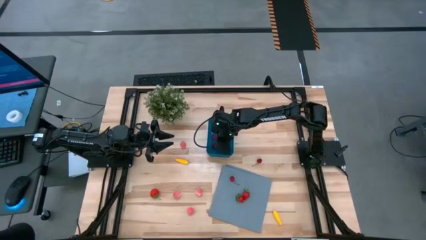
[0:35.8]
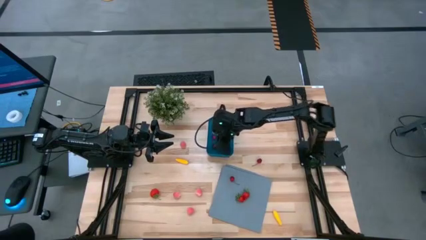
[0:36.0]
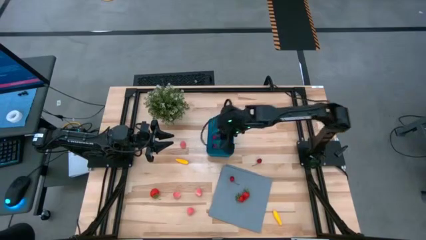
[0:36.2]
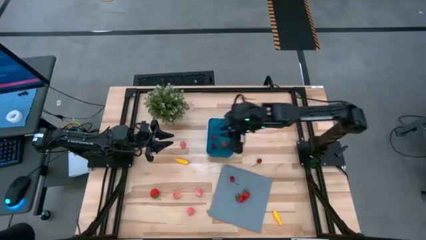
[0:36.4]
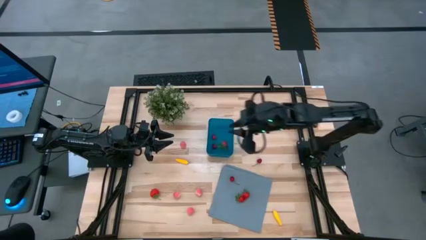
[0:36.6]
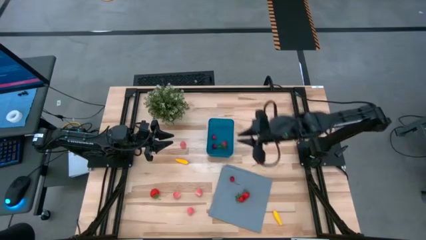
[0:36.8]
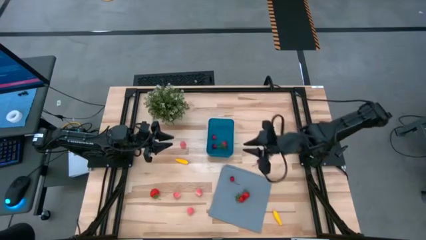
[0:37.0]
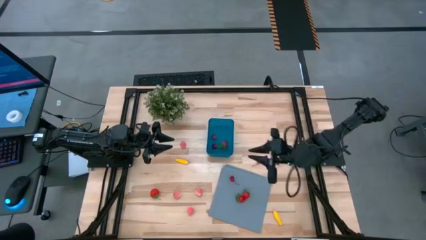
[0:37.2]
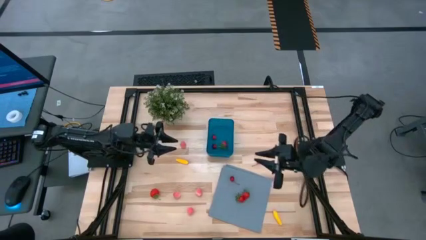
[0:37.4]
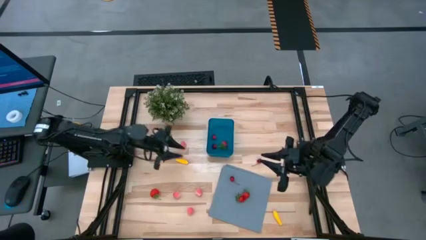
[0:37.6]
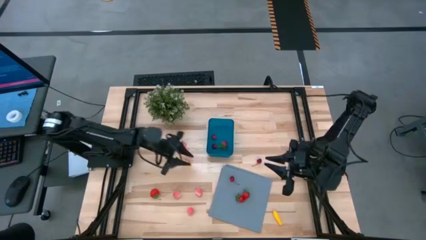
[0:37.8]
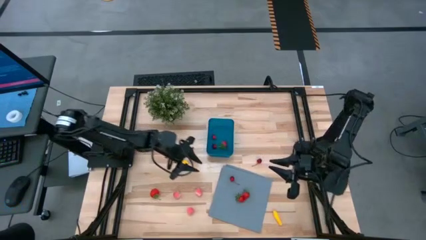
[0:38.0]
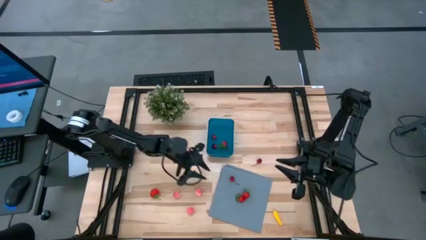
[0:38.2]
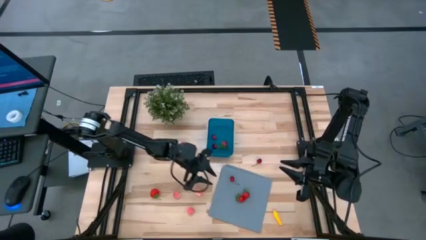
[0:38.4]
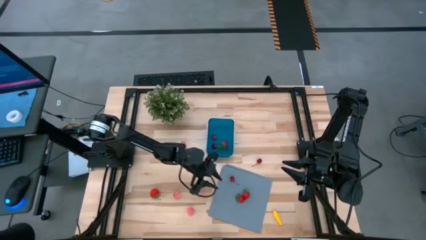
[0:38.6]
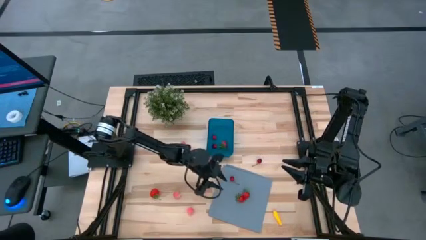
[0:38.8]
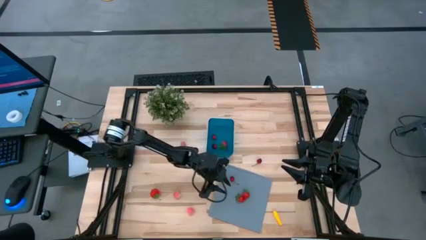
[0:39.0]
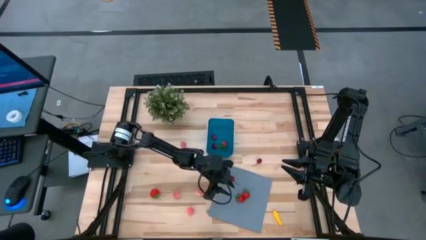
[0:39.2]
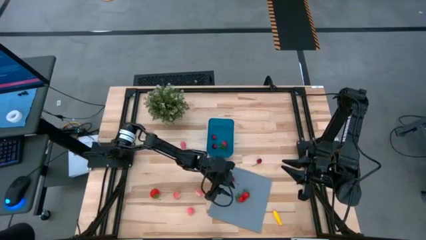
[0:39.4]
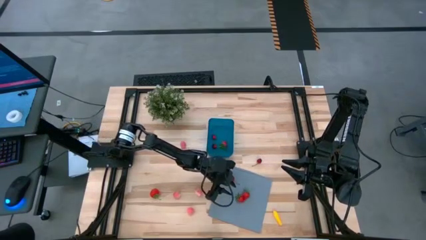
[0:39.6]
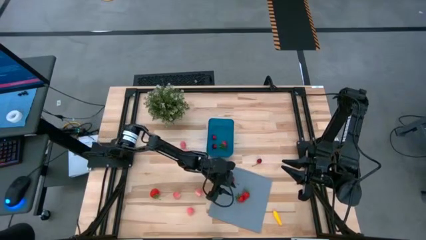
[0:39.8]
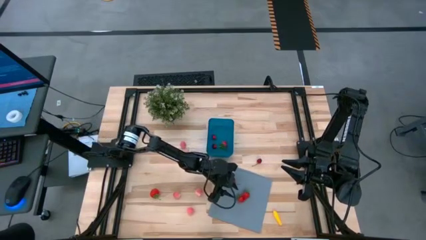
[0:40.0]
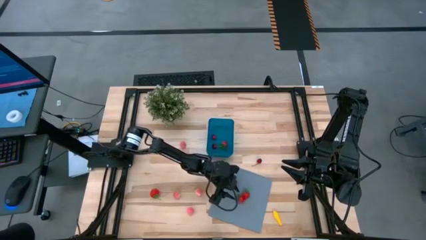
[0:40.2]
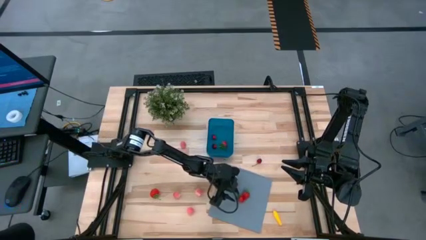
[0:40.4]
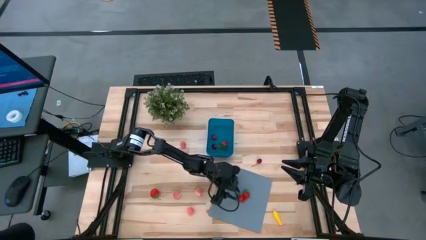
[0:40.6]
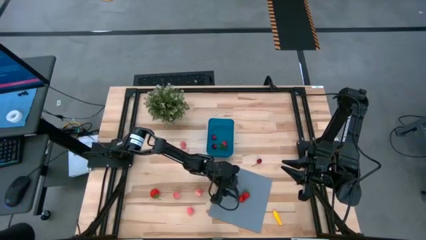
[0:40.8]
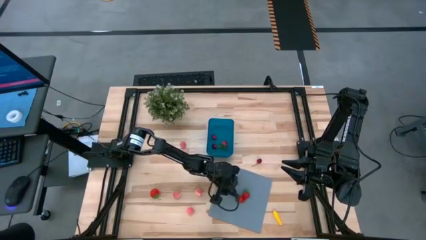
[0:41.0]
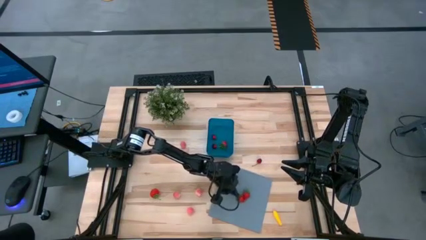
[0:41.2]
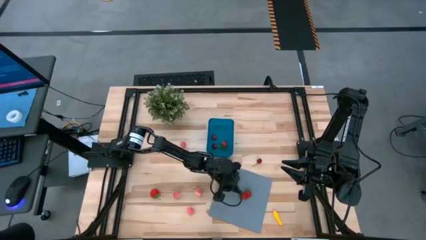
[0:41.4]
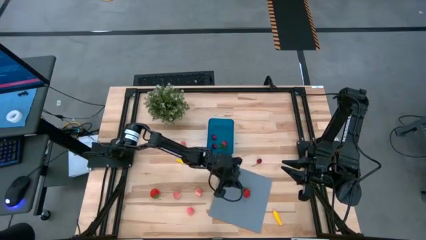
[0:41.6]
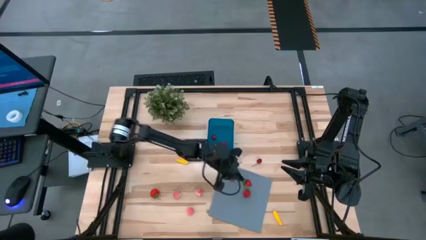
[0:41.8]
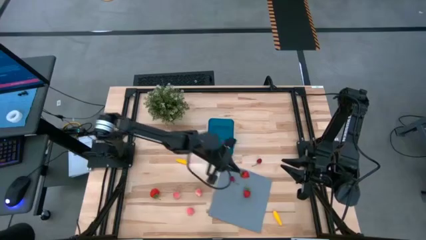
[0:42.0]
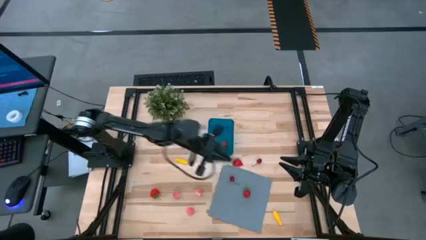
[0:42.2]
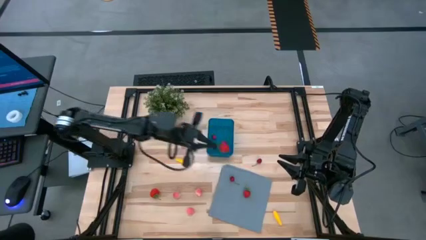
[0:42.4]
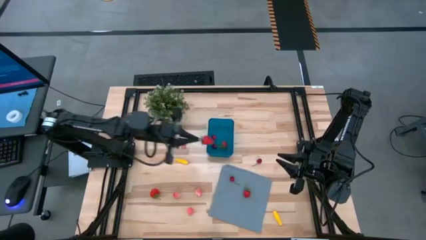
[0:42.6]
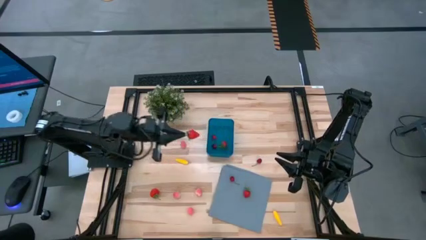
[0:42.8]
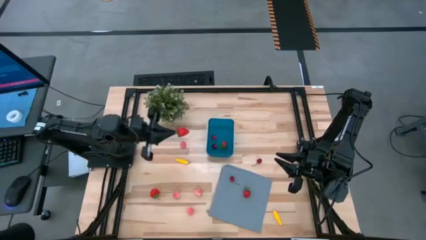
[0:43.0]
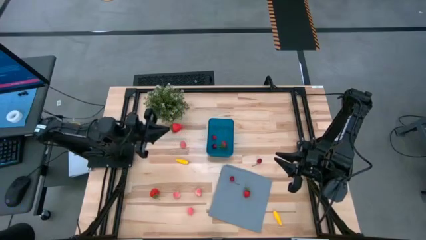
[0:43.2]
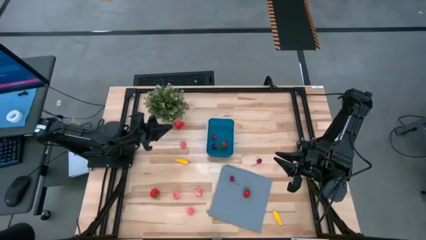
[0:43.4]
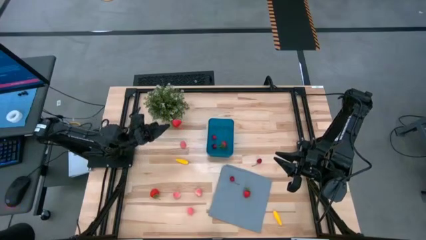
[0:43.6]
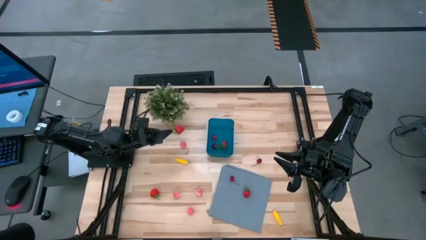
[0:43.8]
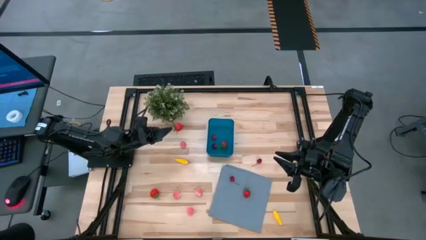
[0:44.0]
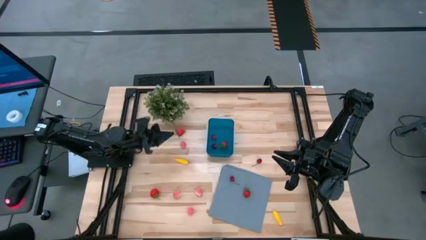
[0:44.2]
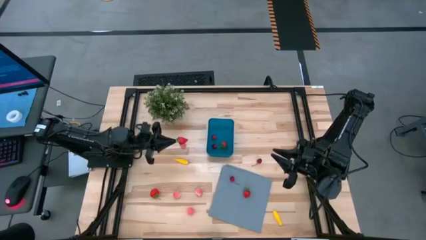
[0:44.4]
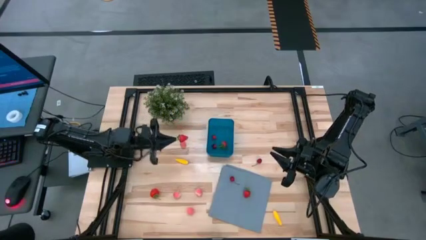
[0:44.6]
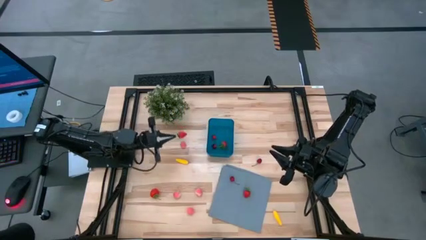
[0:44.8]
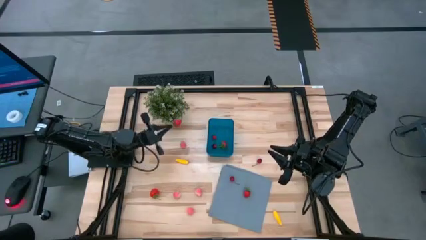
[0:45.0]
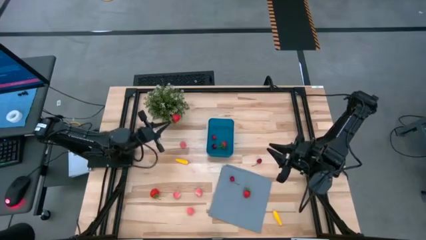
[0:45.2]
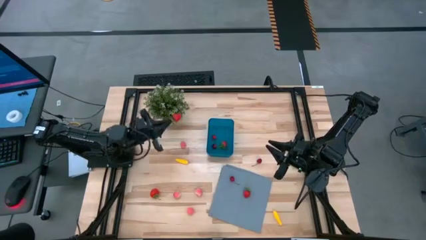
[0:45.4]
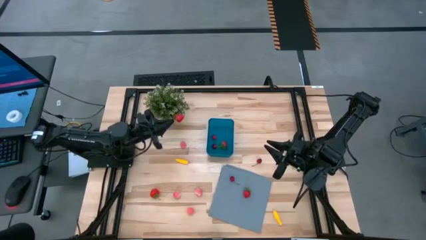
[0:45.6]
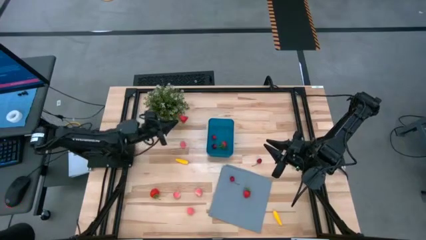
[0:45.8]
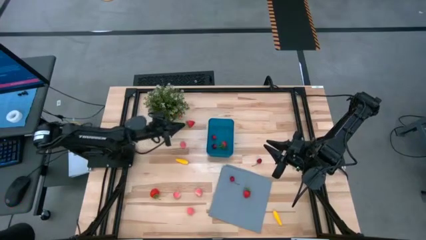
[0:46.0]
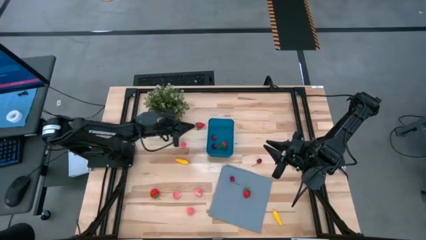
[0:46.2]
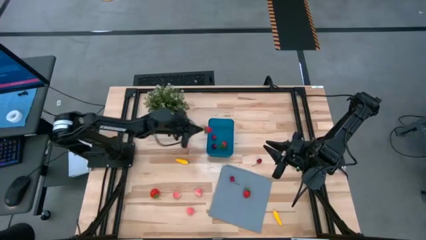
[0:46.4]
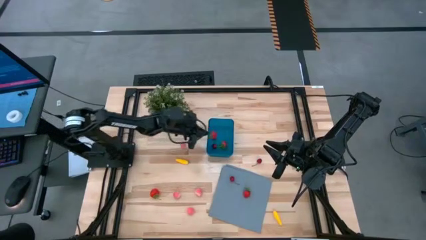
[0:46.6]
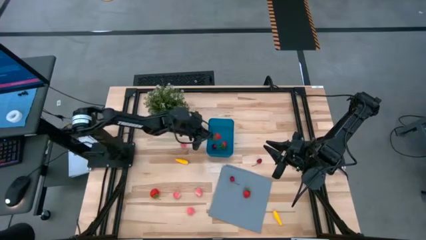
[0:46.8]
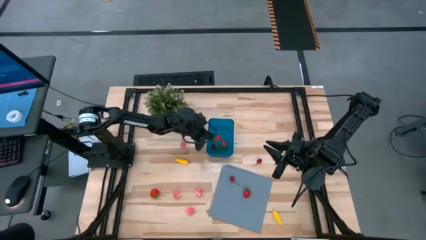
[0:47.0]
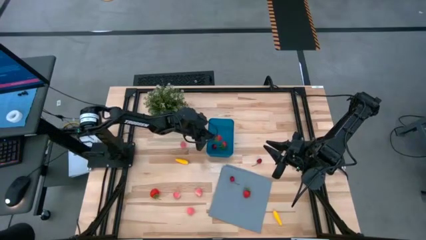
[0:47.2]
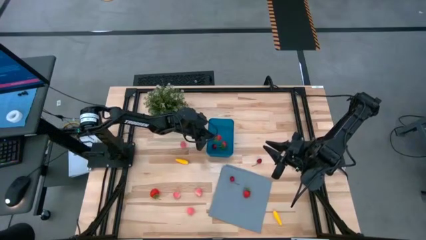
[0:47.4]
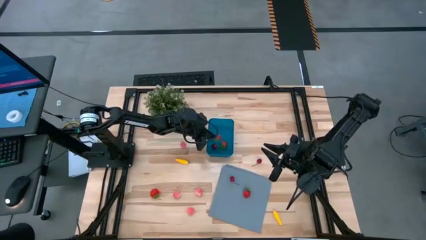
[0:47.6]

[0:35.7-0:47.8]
Task: Pick and placing Produce into tupperware
Put the strawberry into the blue bin

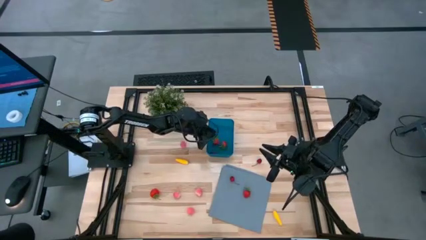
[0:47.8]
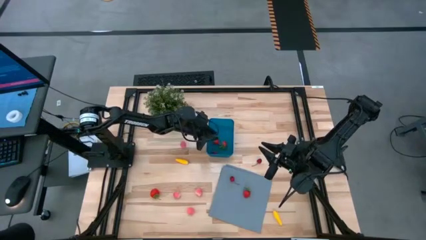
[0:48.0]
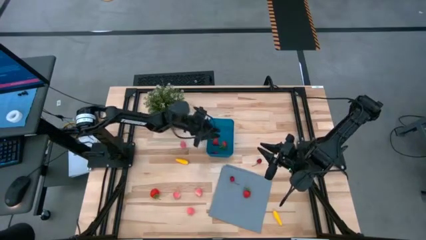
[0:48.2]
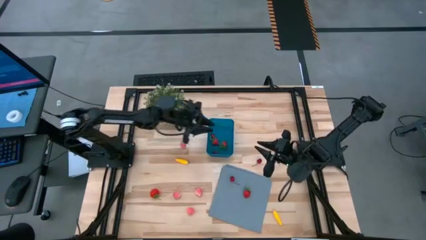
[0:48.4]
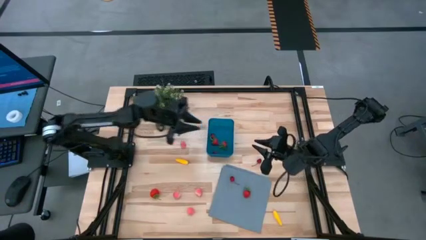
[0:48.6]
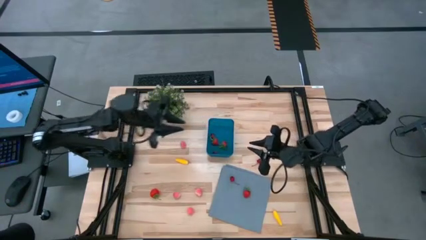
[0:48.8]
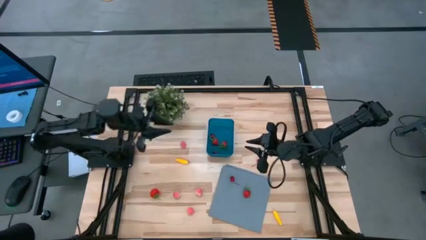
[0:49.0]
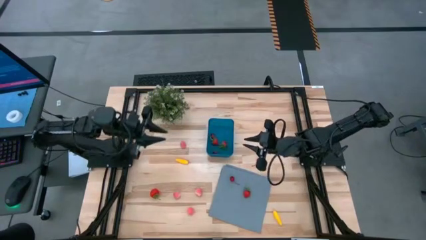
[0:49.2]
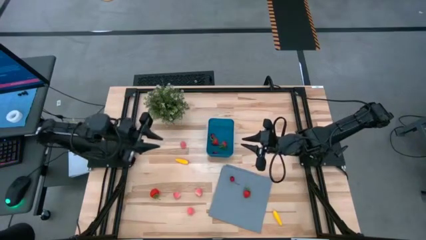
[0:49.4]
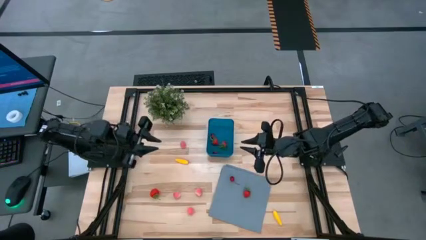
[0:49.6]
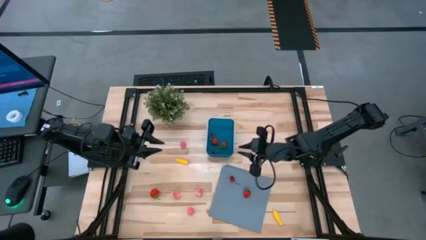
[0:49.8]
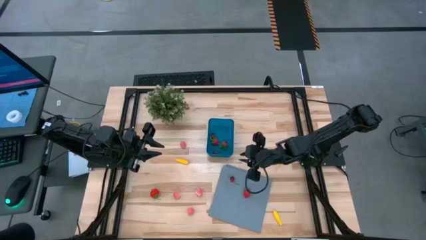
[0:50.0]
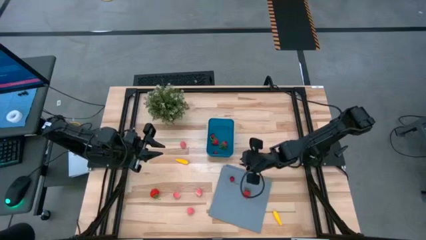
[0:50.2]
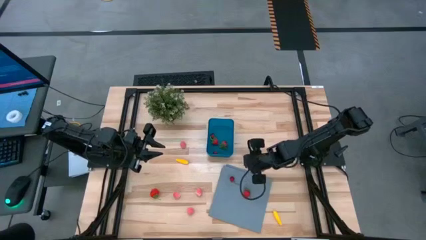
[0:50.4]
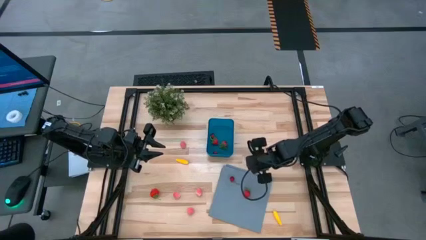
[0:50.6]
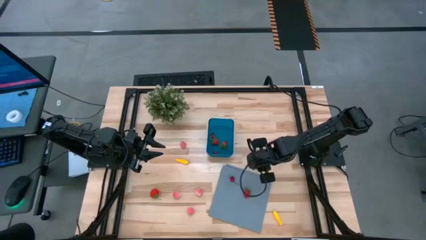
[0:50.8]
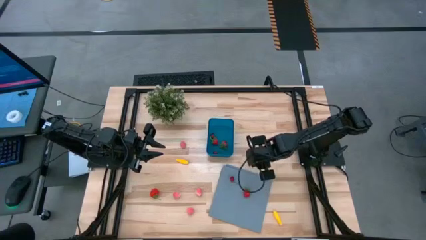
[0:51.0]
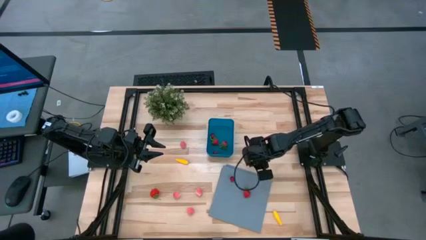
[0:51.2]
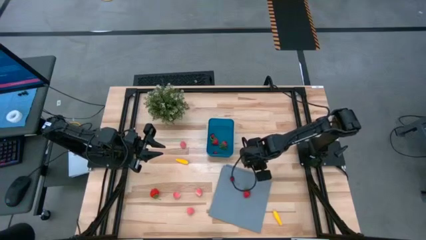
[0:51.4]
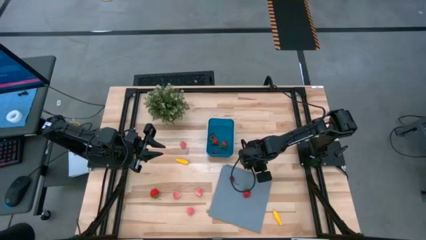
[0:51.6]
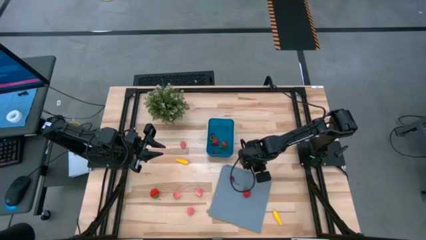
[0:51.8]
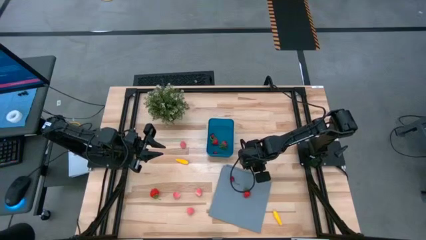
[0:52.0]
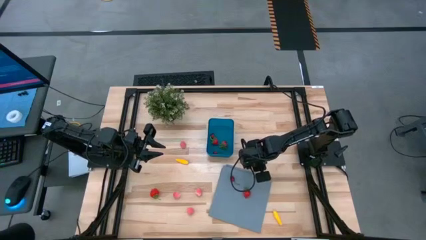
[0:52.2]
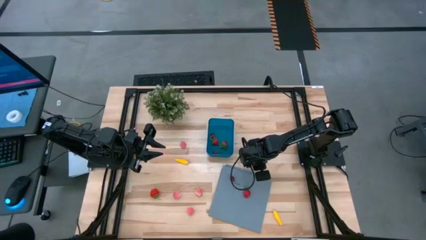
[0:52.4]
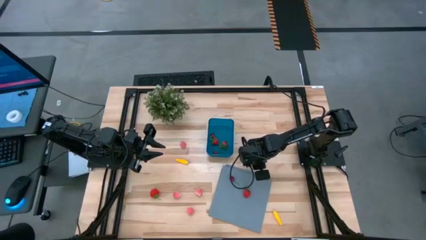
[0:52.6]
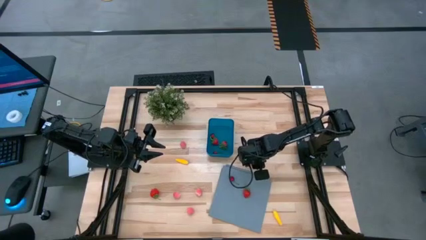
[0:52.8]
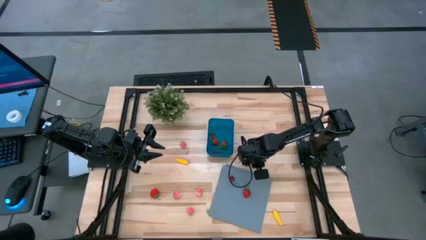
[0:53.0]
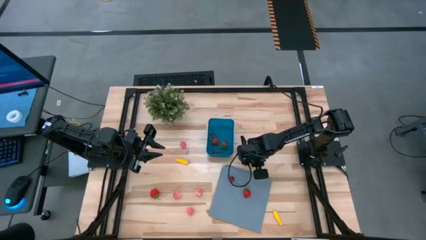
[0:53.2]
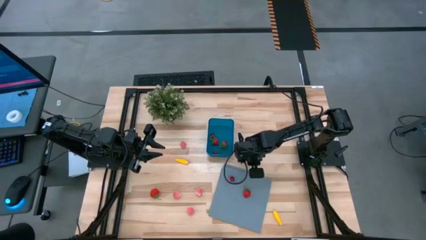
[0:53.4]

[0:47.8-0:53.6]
Put the cherry into the blue bin
